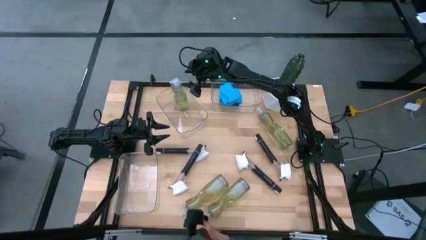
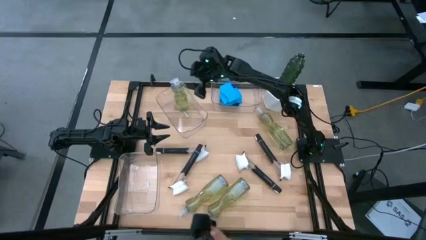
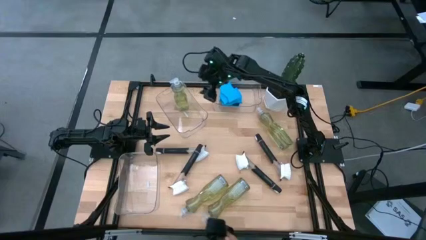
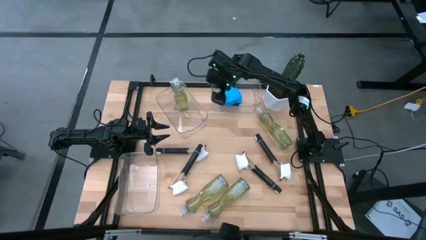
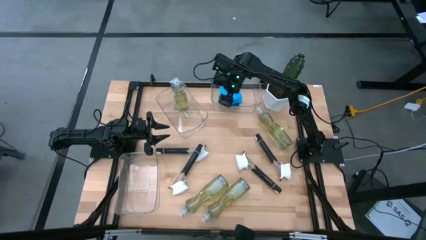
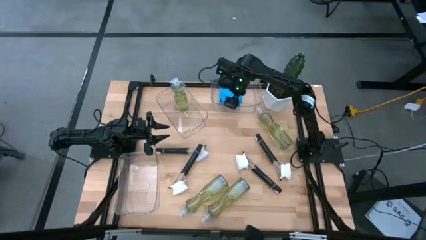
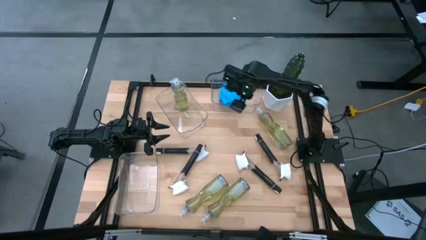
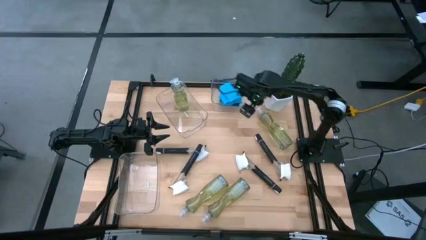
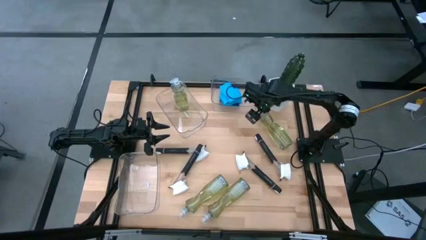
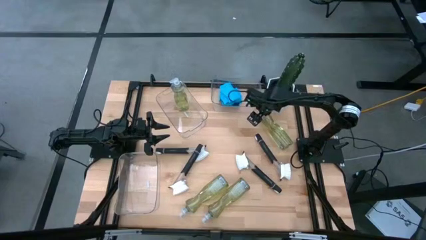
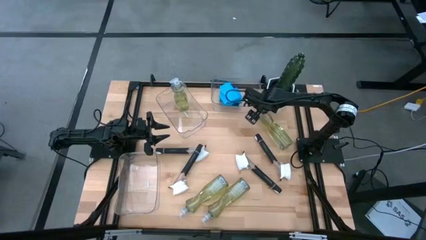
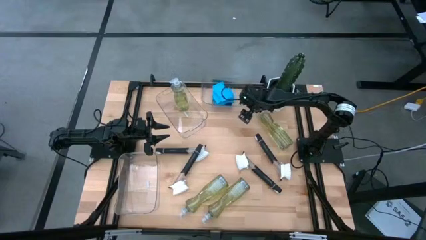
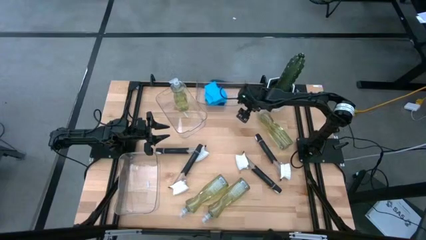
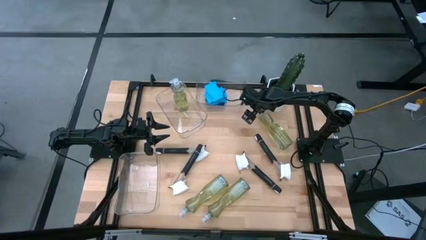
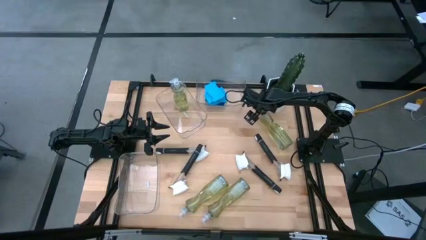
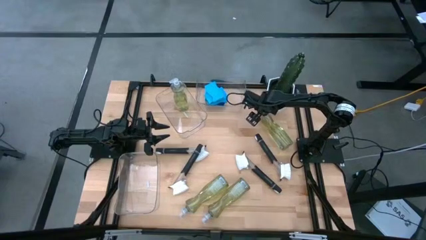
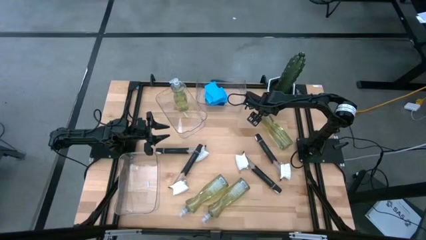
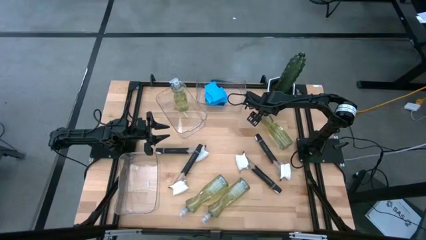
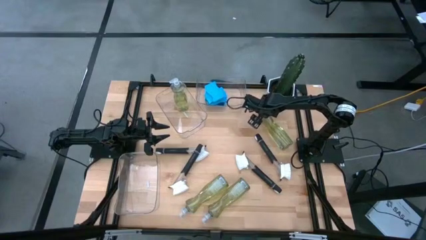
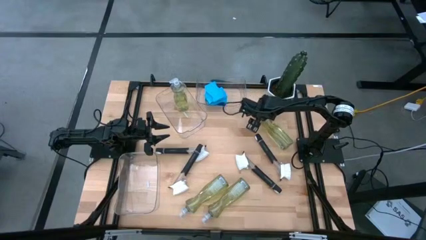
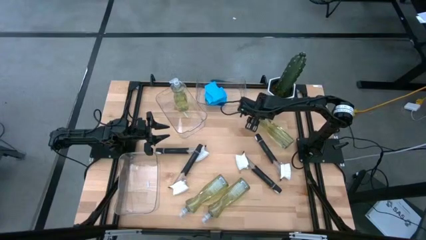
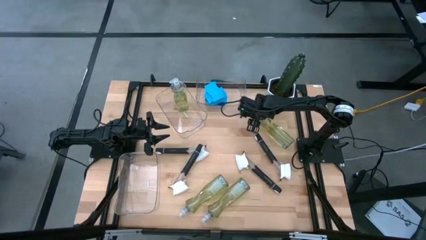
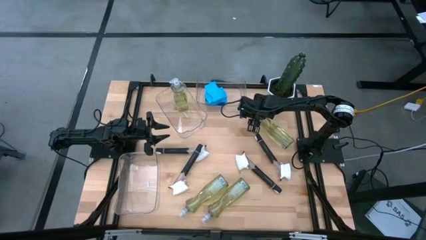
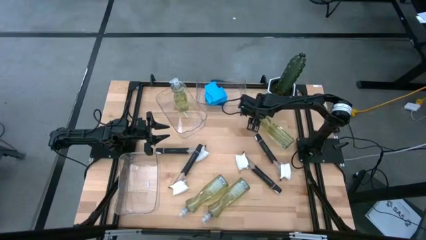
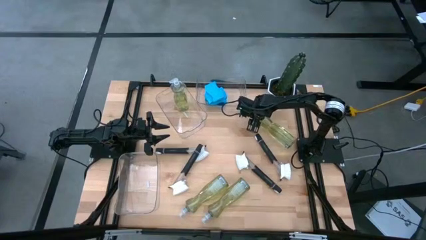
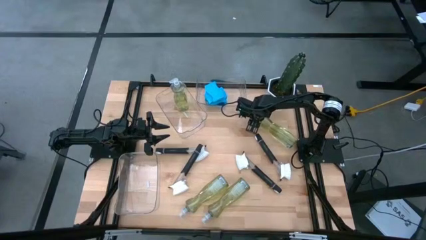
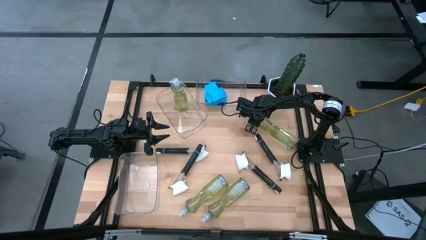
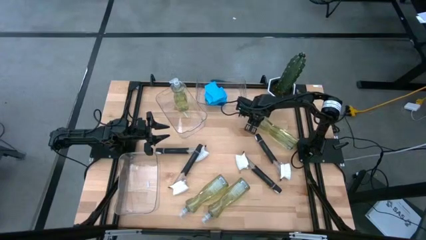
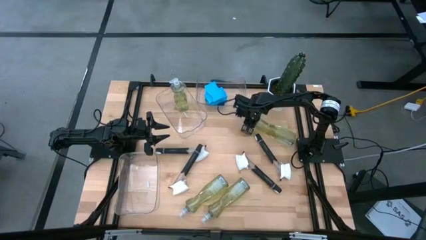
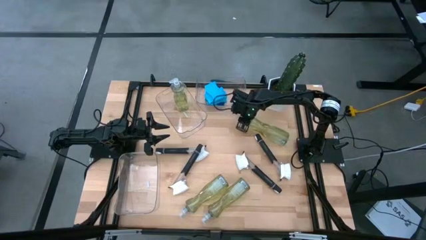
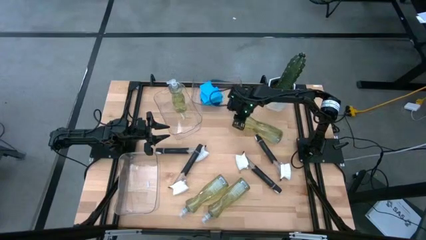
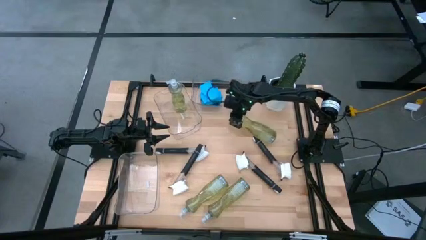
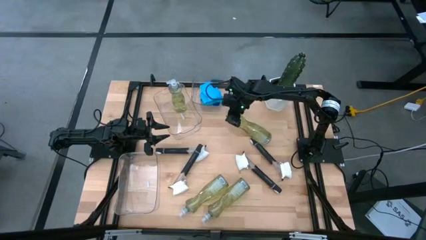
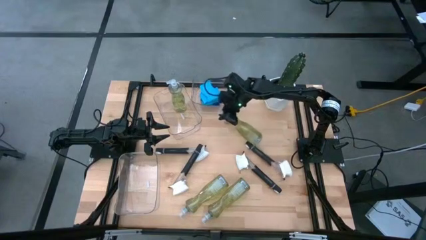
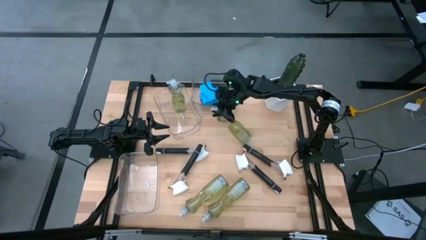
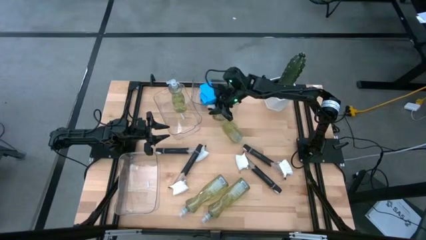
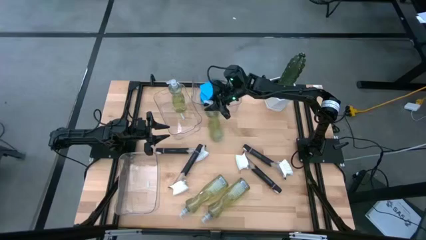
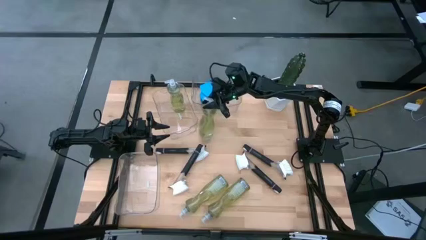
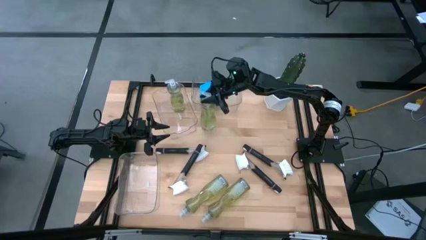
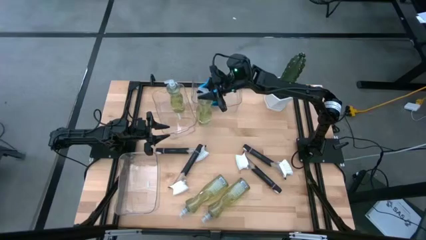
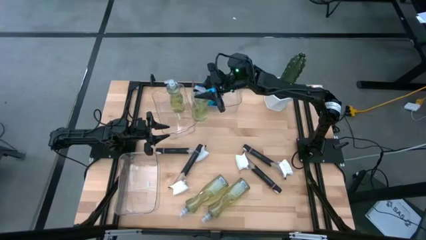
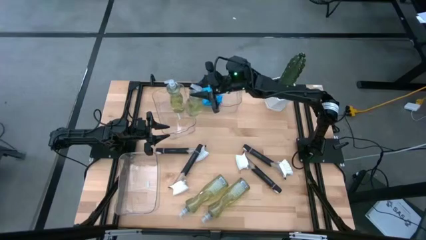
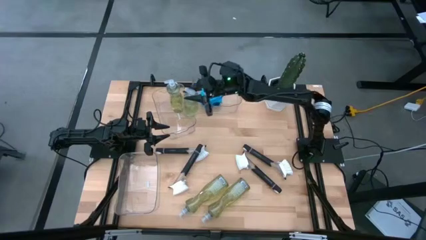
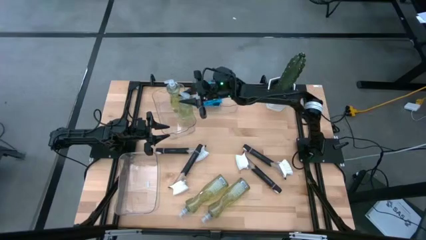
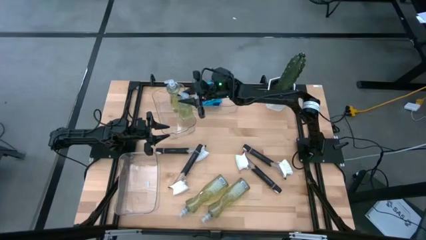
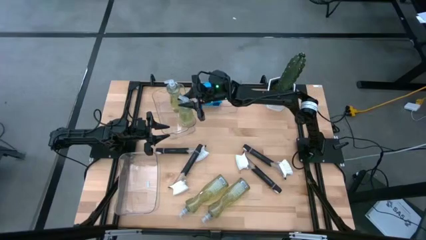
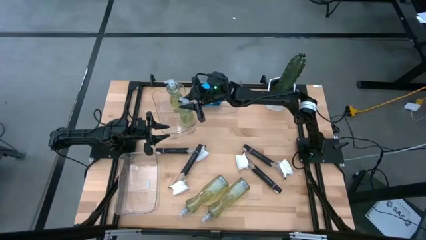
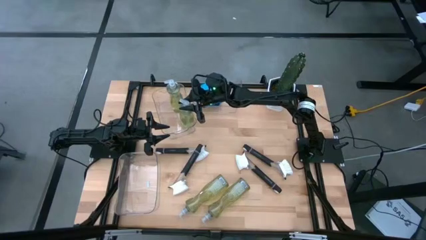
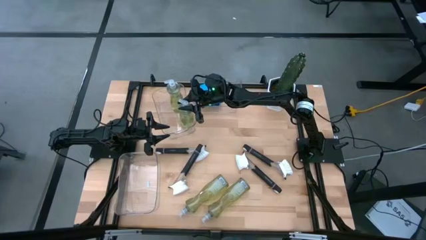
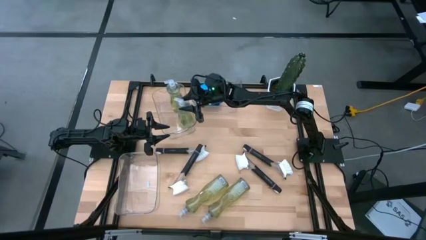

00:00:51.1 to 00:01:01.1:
Task: Pick & Place Kitchen Sink Supplies
Put the yellow dishwashing liquid bottle into the top left transparent bin

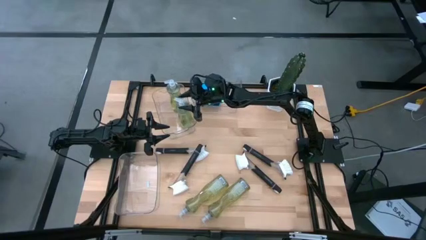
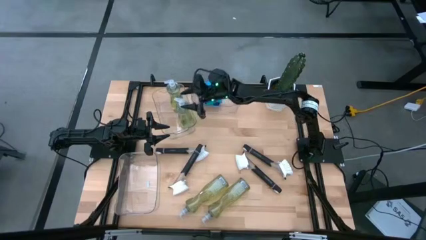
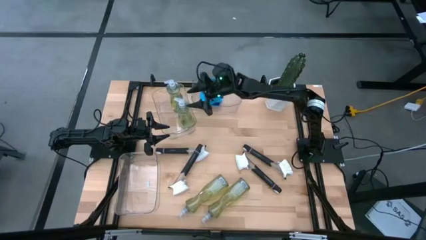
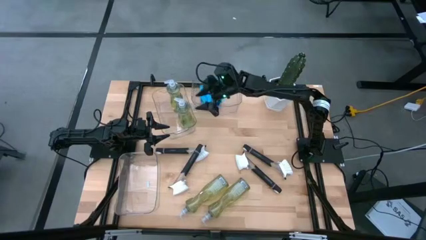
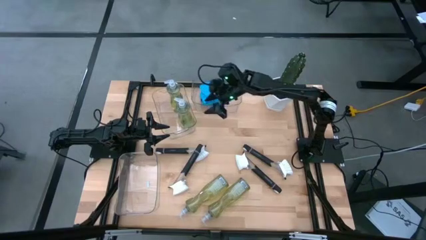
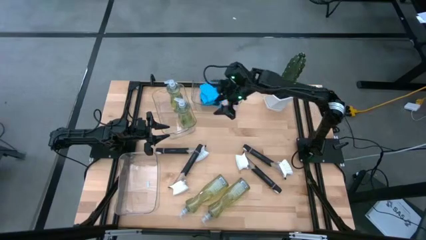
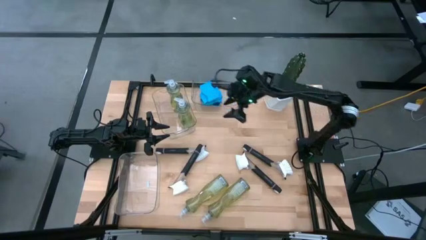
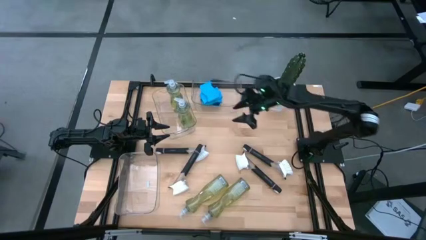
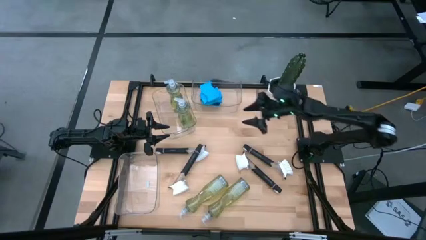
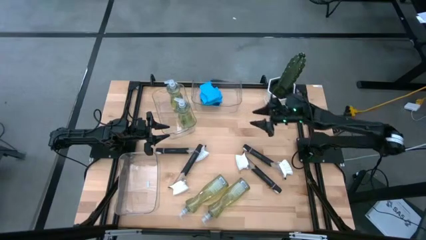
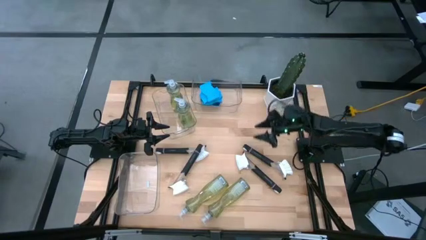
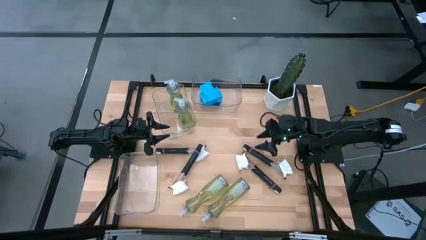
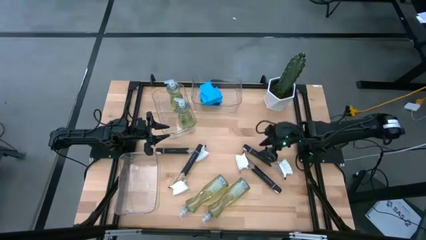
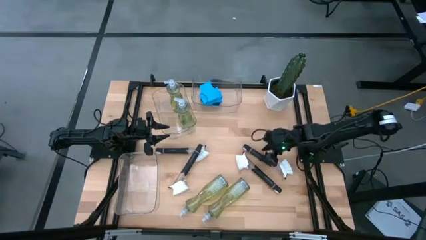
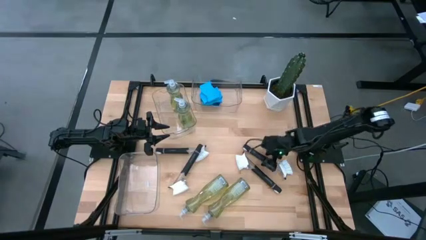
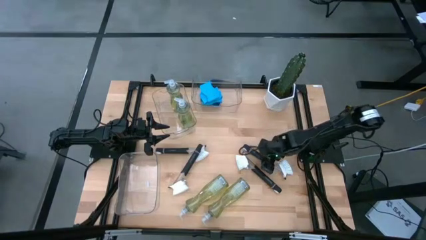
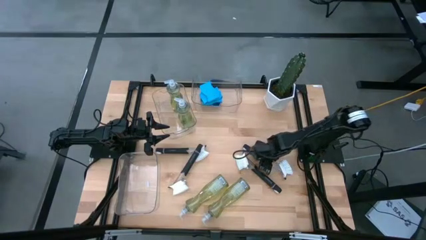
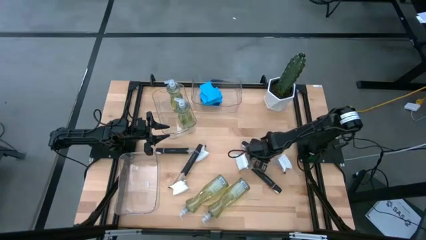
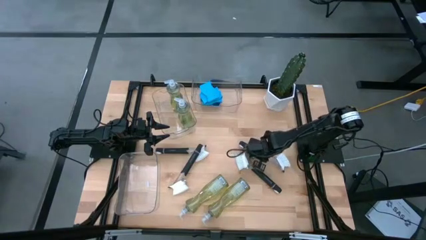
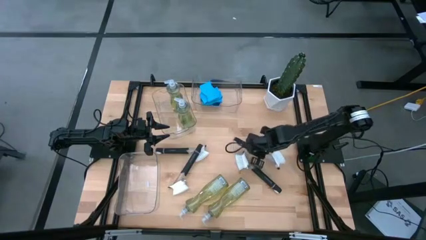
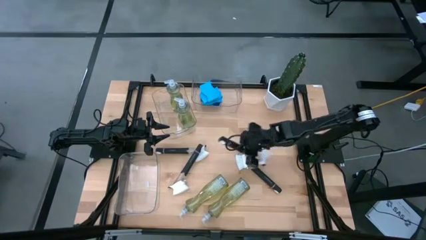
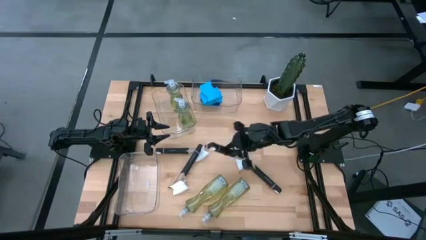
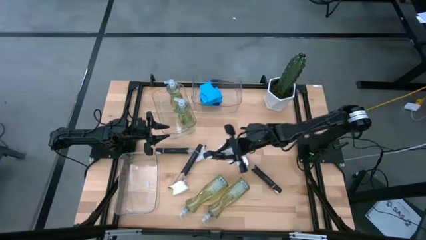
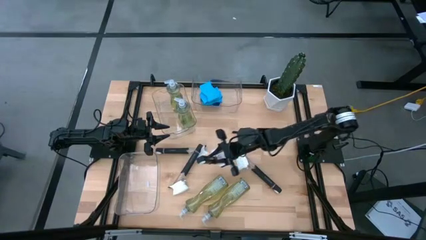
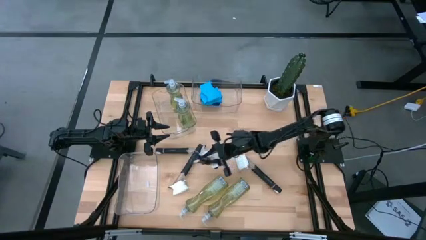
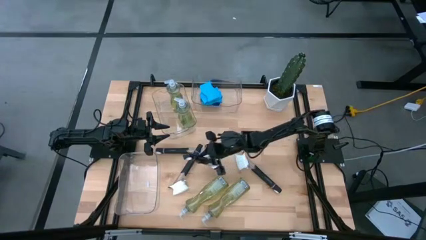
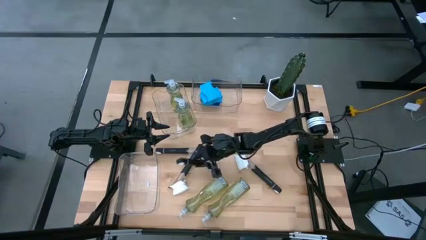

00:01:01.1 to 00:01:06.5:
Move the dish brush from right to left

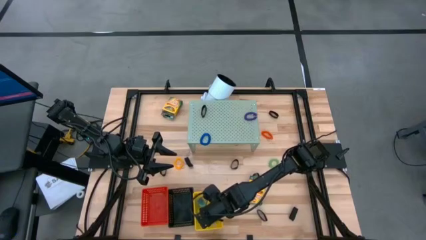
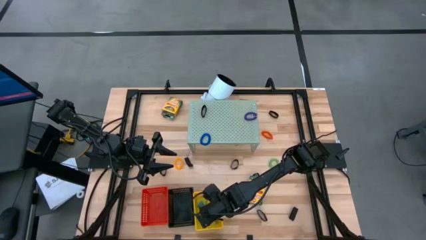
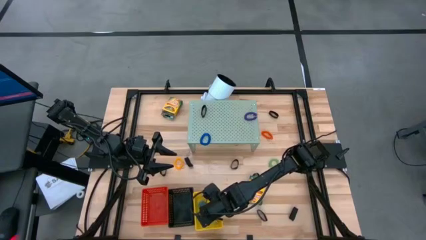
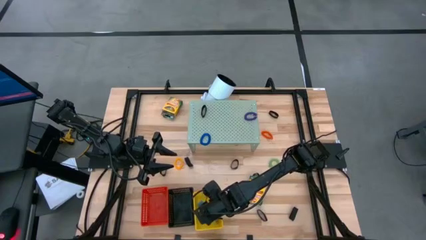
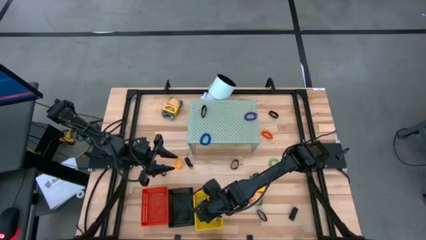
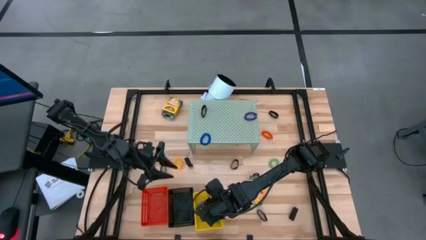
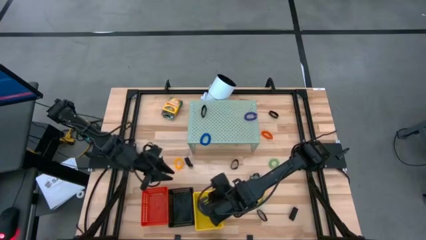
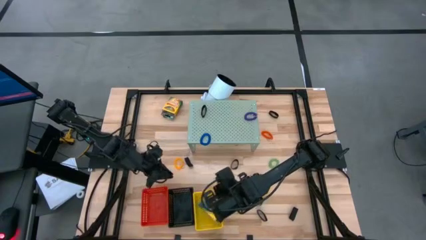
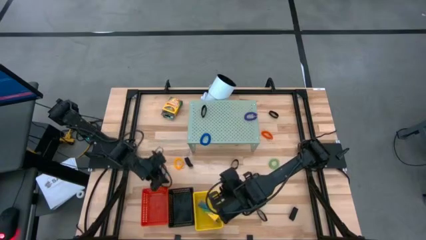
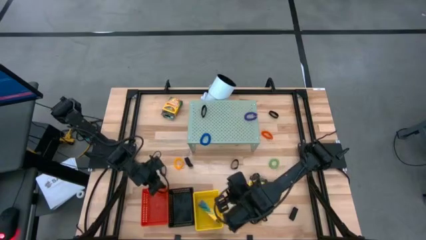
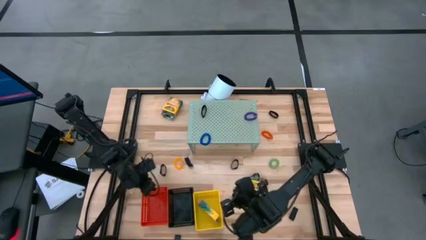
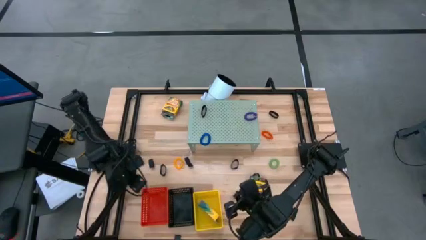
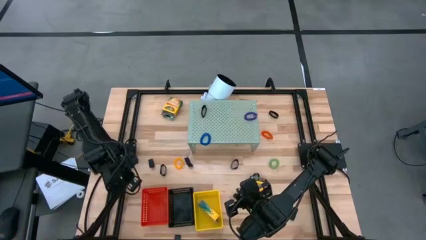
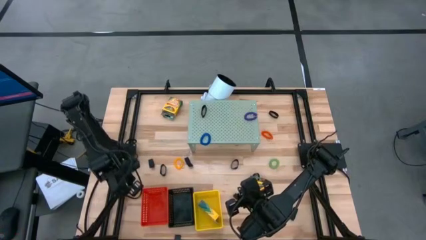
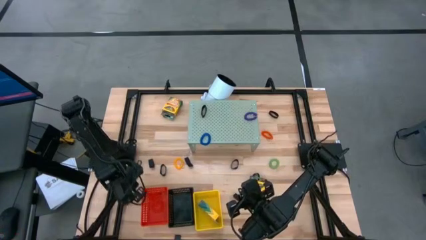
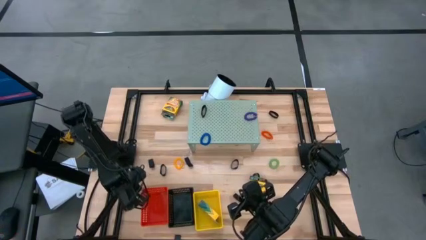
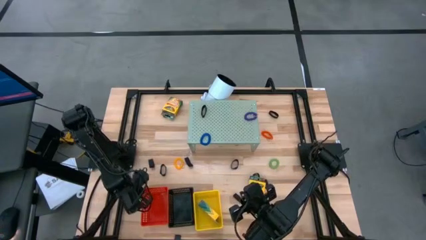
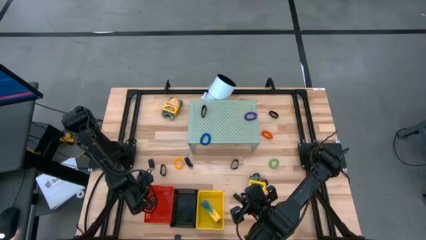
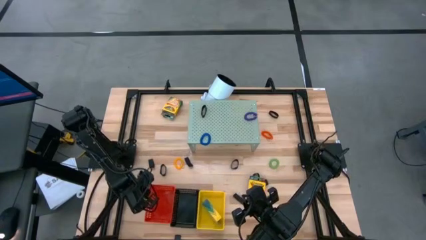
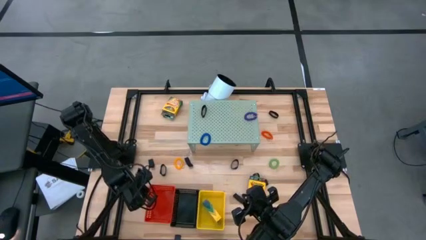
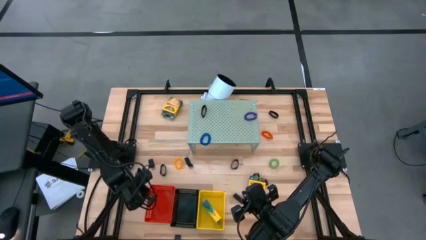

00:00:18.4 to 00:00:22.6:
Task: Pick & Place Office Desk Supplies
Adjust the red bin on the table
